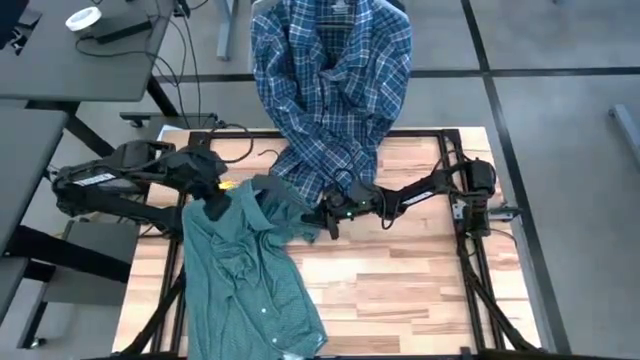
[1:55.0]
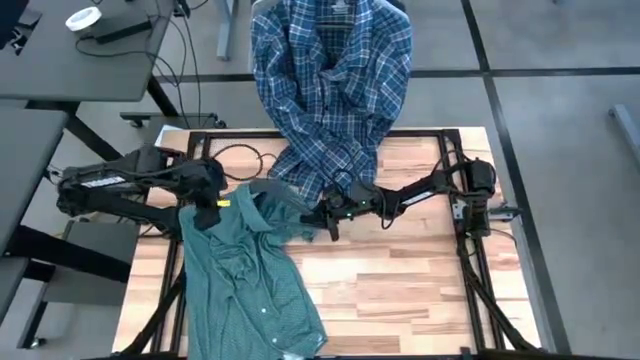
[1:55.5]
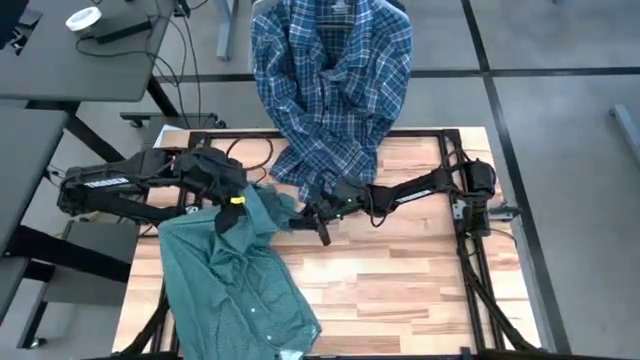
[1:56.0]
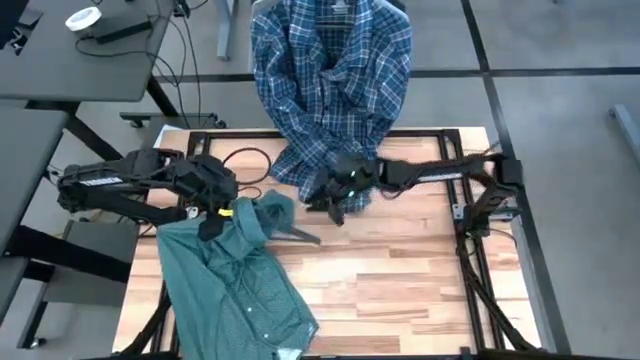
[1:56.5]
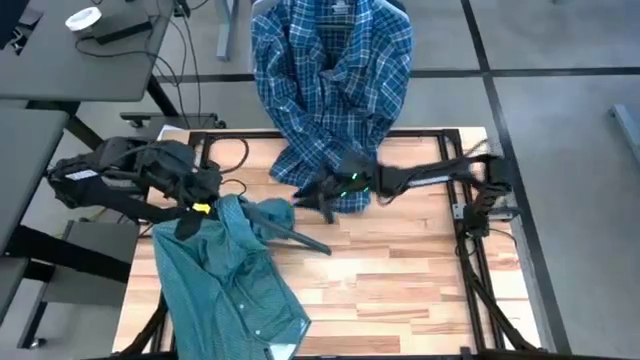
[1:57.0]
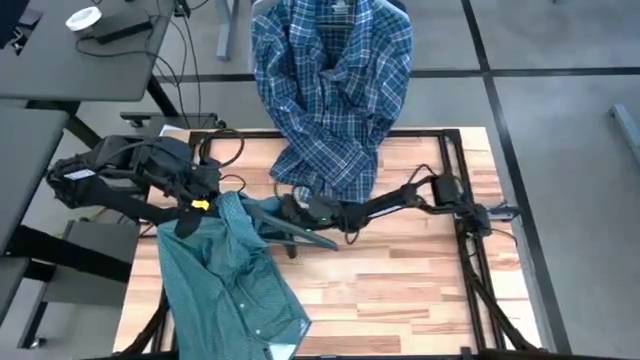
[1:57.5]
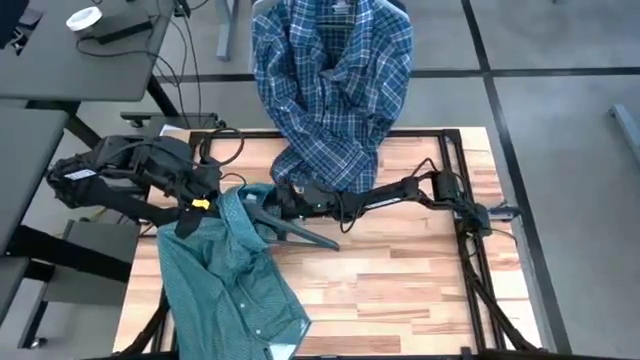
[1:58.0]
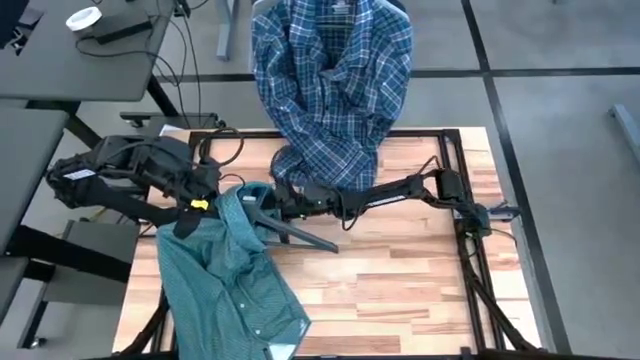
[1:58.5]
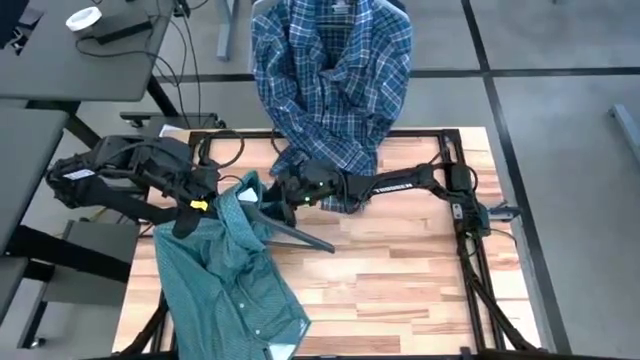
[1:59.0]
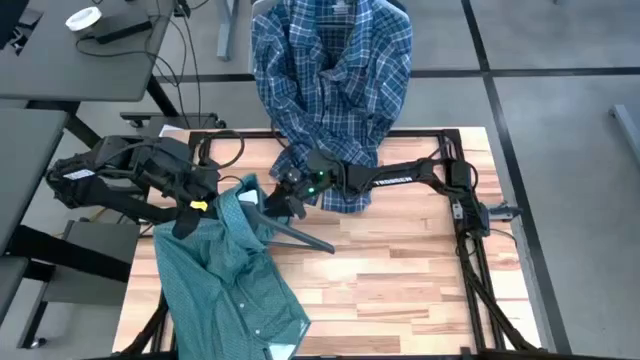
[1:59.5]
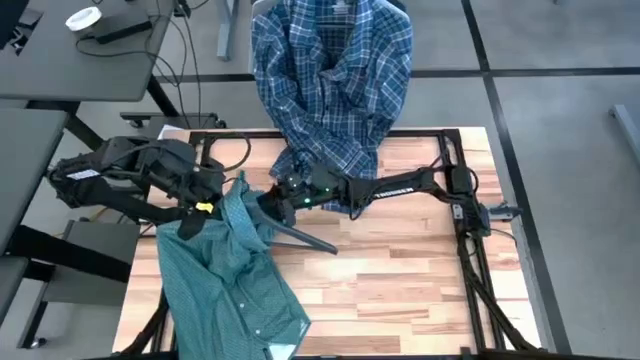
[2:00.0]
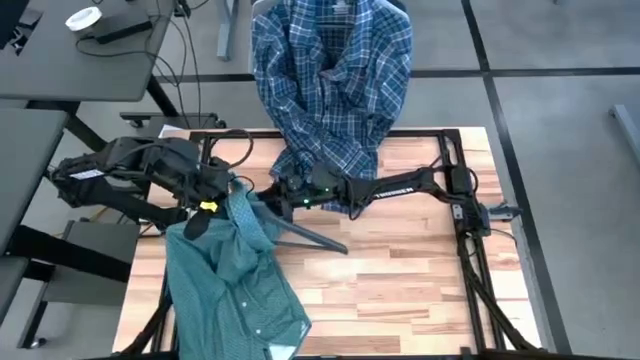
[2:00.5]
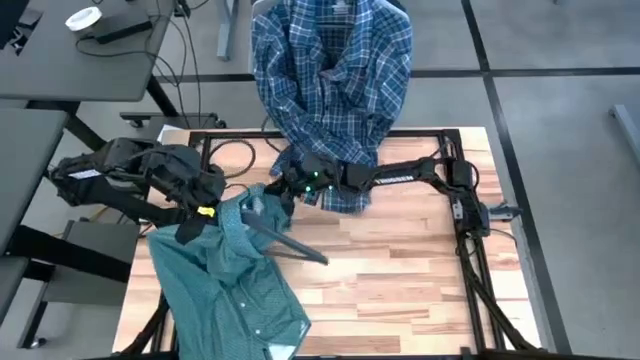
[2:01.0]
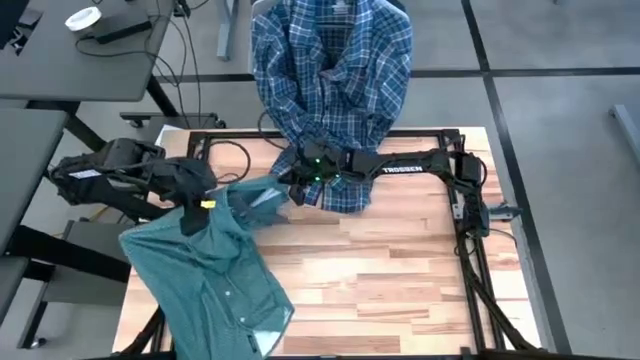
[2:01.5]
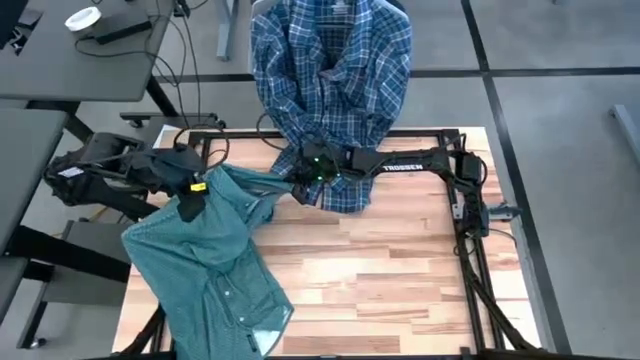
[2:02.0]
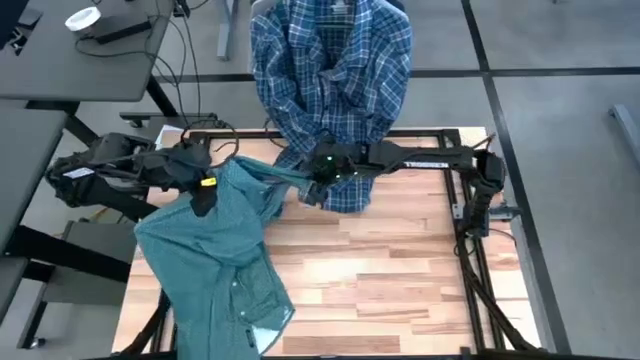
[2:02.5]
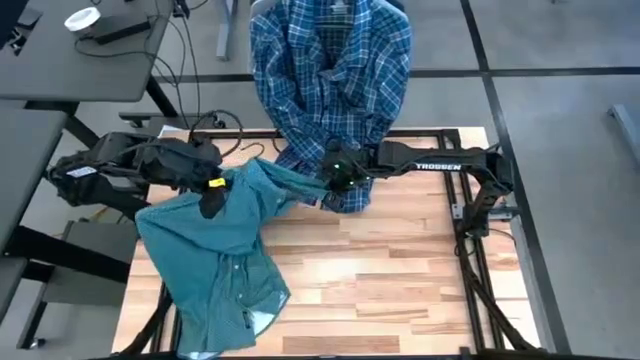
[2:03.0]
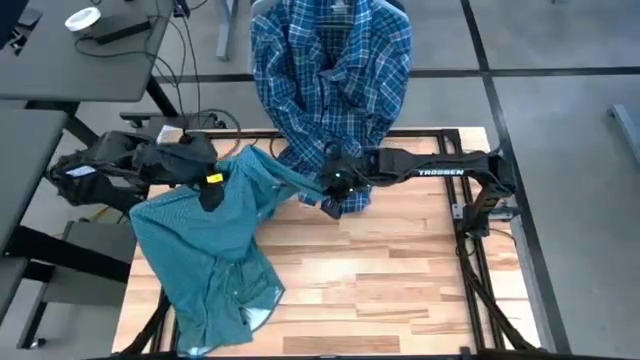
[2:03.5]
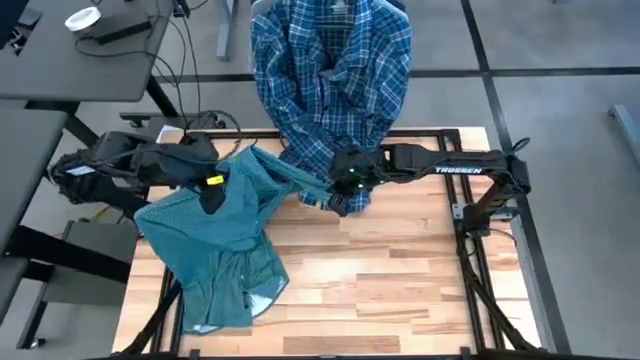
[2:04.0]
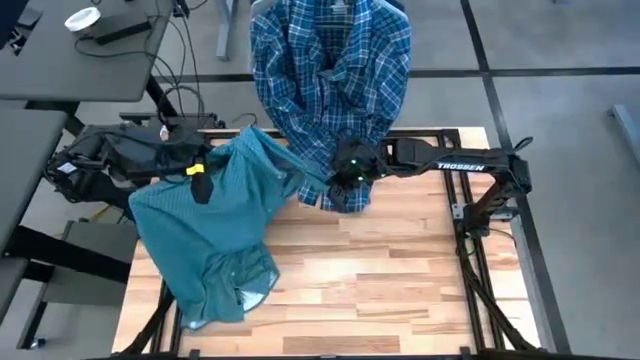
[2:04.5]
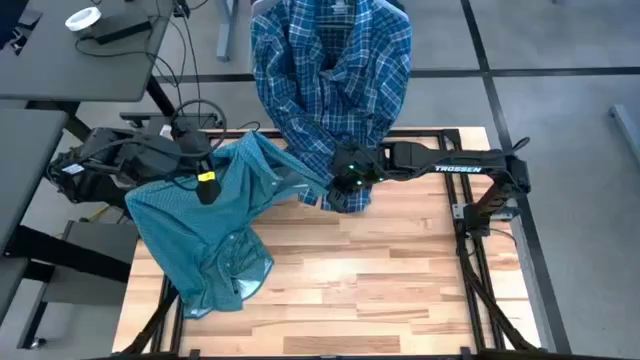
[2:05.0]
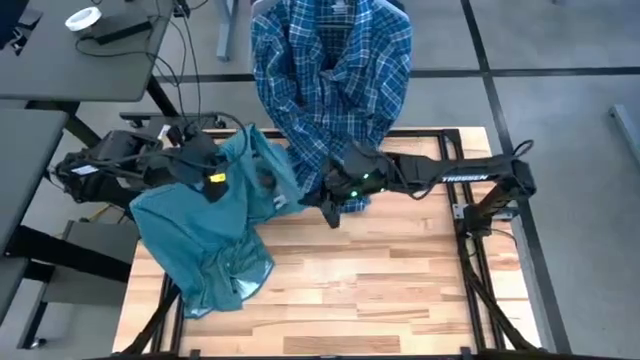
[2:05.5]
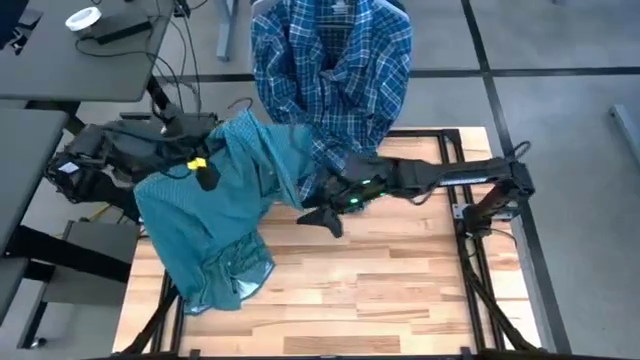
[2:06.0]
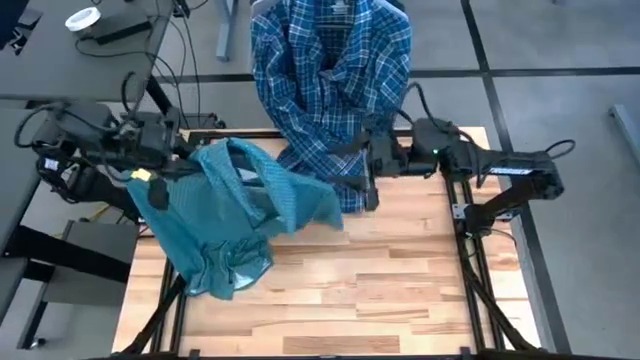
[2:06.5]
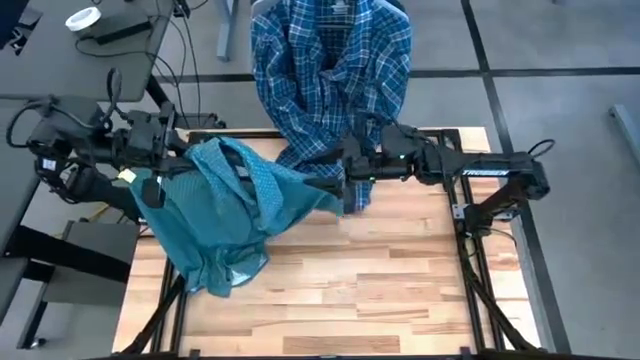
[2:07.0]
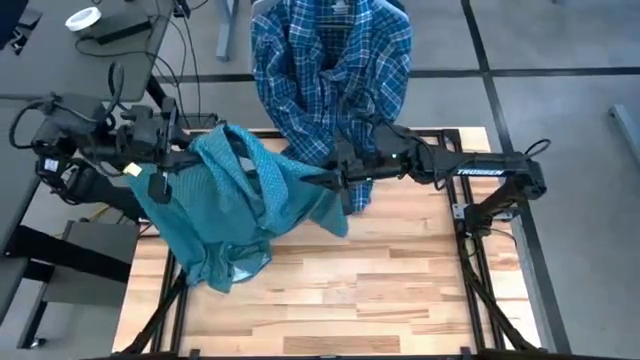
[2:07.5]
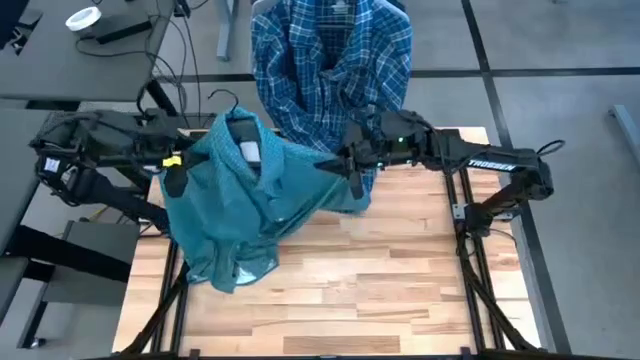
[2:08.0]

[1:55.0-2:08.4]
Task: Hang clothes
Put the green polo shirt on the gray hanger

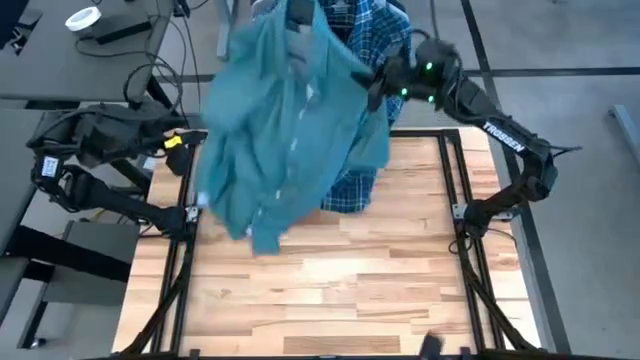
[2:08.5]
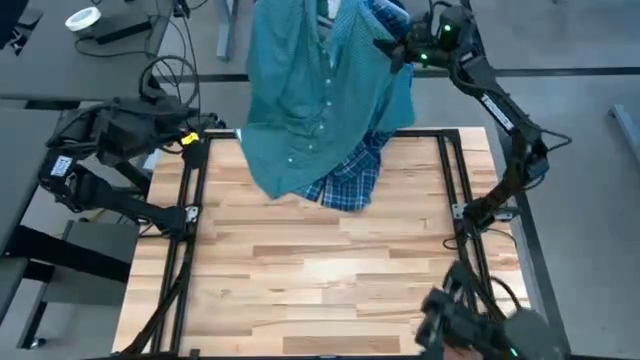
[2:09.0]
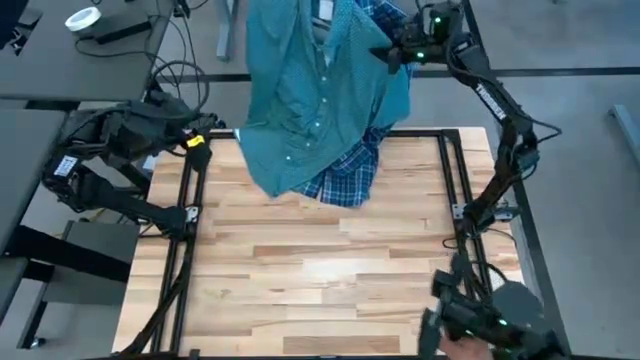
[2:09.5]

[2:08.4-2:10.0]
Hang the green polo shirt on the hanger rack

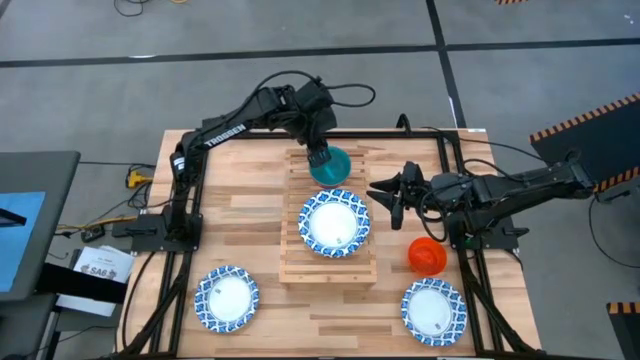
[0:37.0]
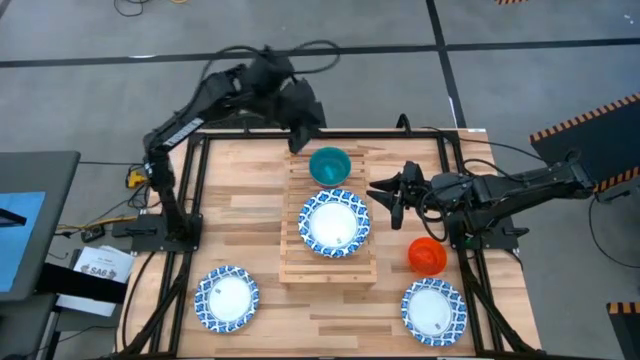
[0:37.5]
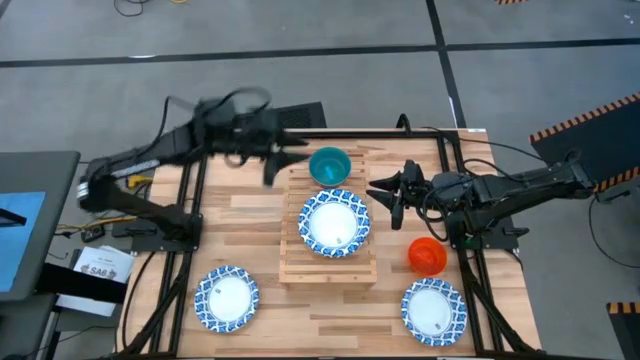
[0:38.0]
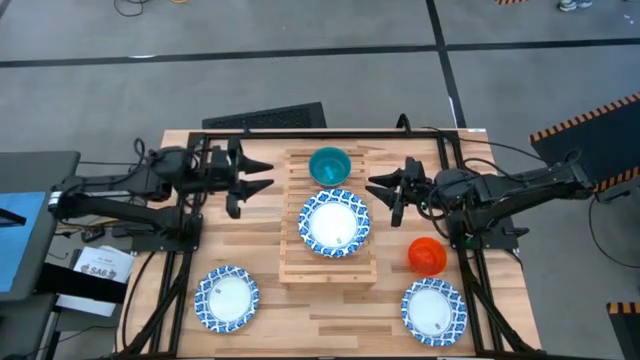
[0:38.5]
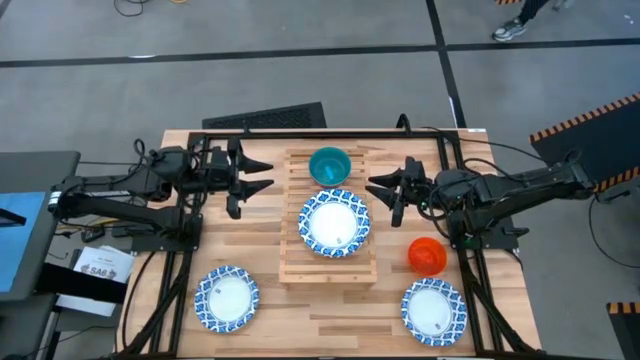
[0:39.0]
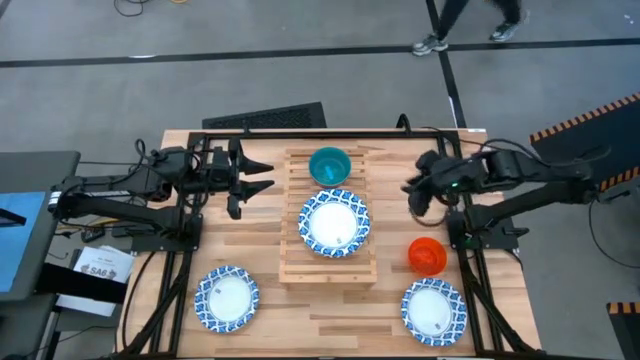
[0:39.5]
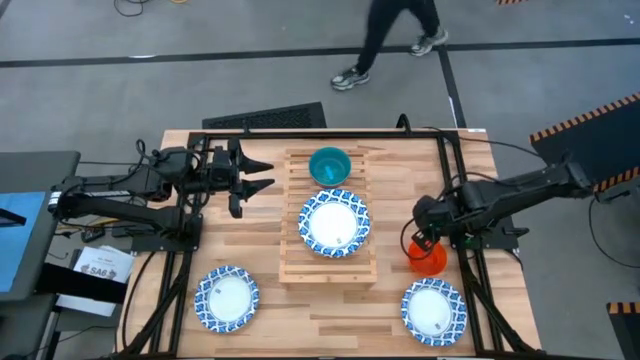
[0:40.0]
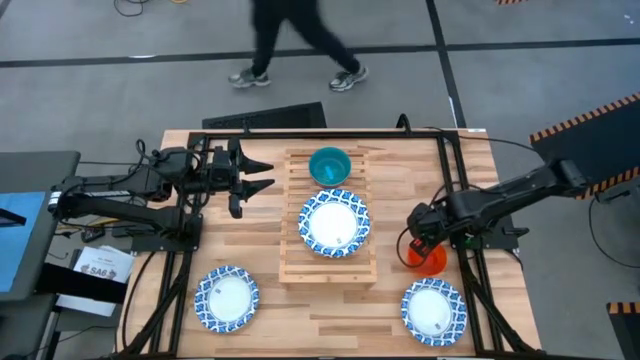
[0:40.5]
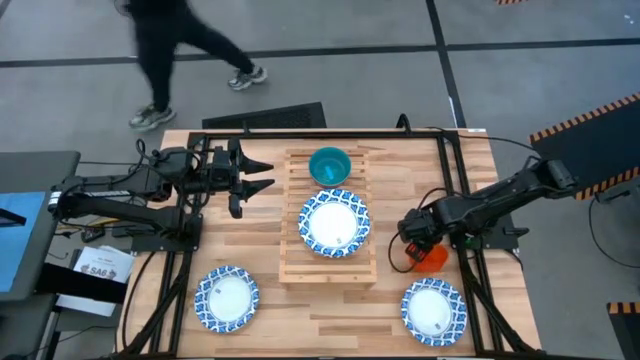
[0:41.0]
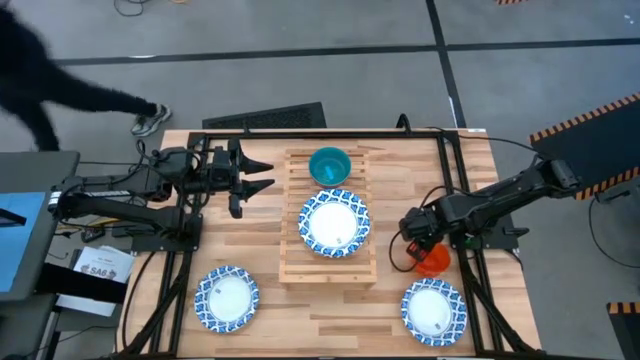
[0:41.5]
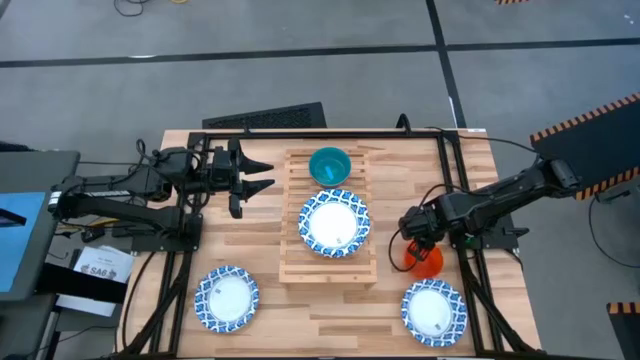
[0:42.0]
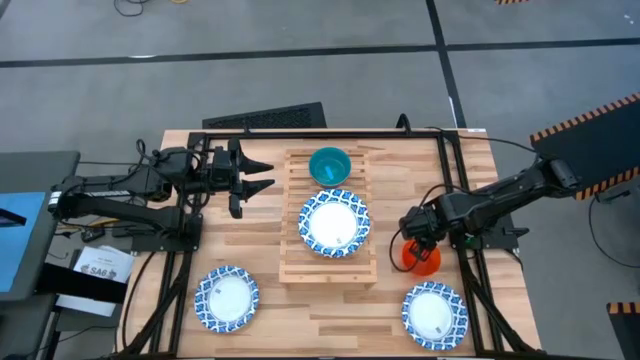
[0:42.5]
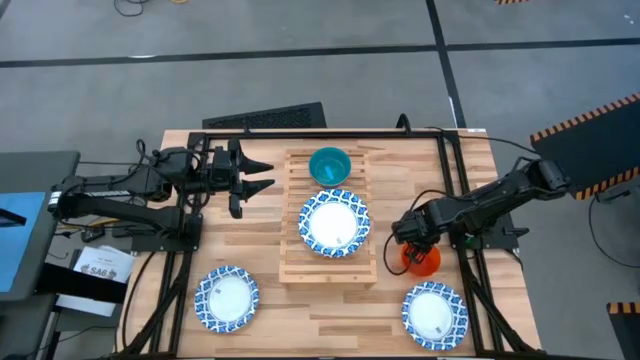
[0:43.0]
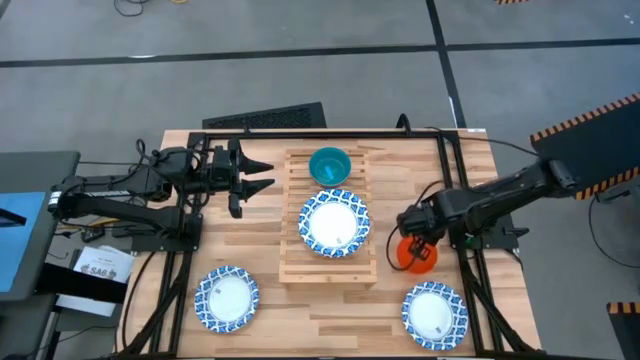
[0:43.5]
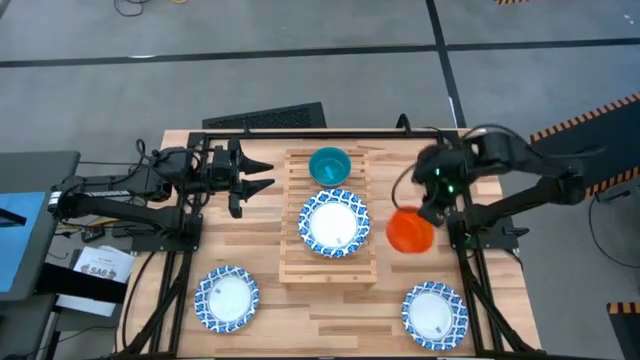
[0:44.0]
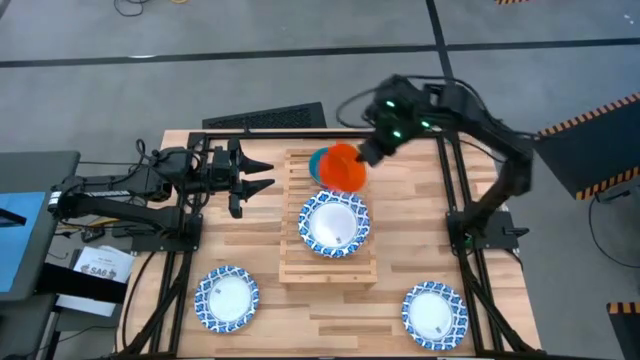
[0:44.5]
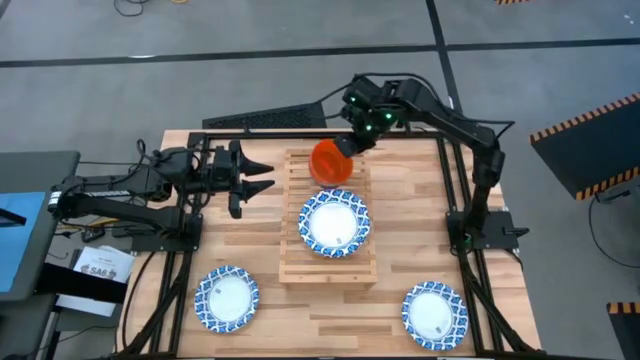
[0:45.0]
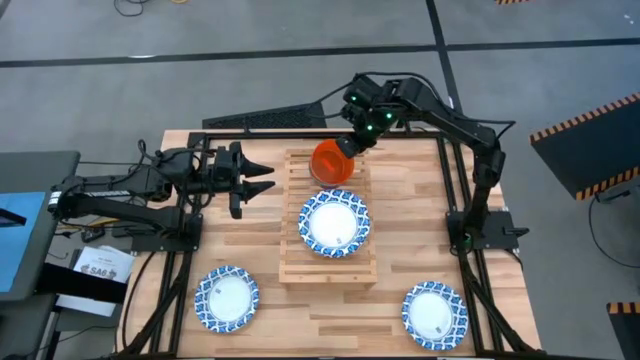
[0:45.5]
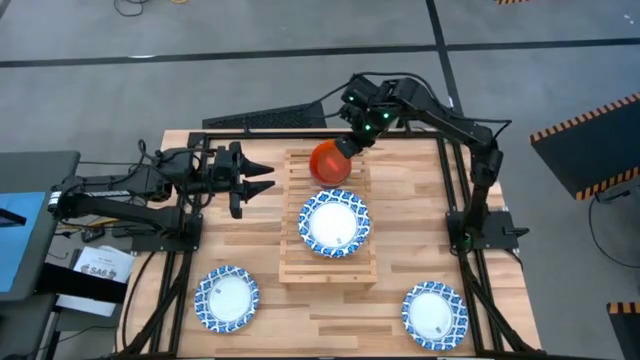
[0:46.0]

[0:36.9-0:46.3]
Task: Place and stack bowls onto a shelf
Stack the orange bowl on top of the blue bowl on the shelf
